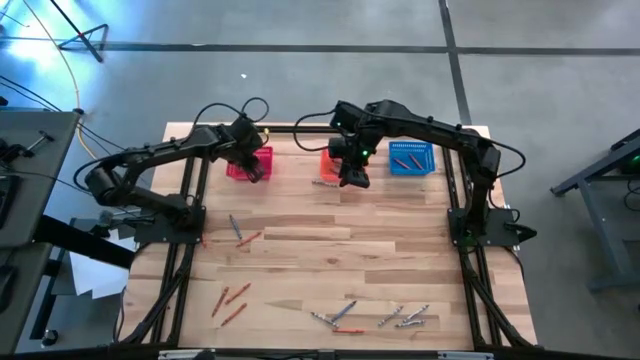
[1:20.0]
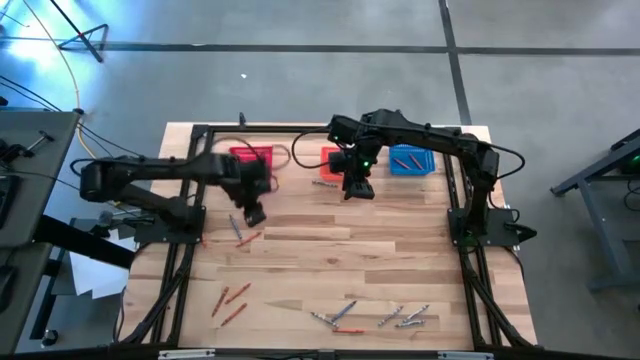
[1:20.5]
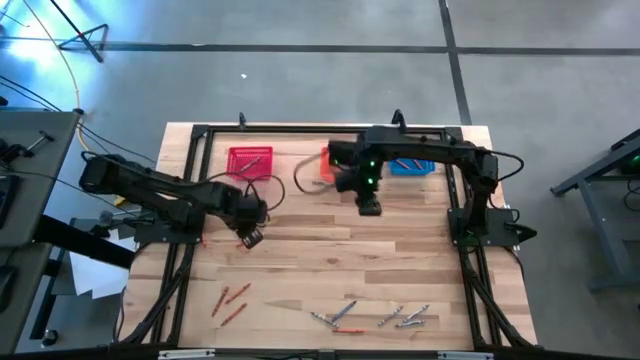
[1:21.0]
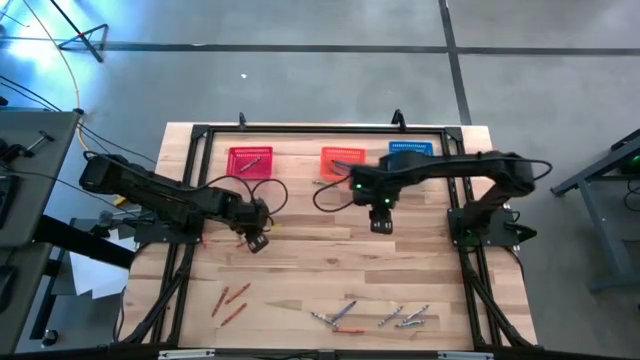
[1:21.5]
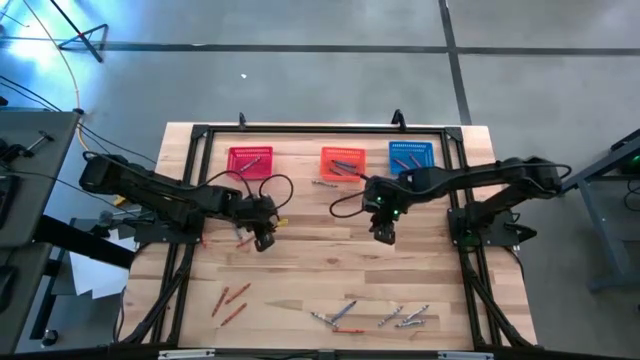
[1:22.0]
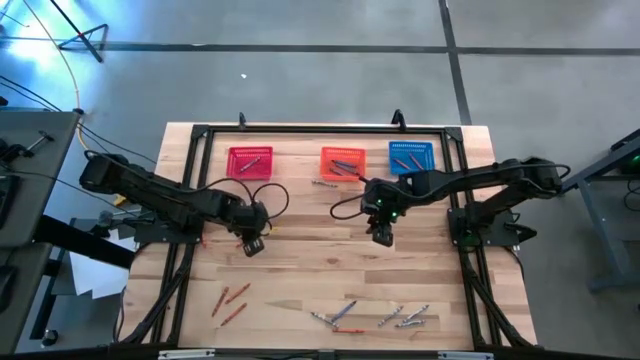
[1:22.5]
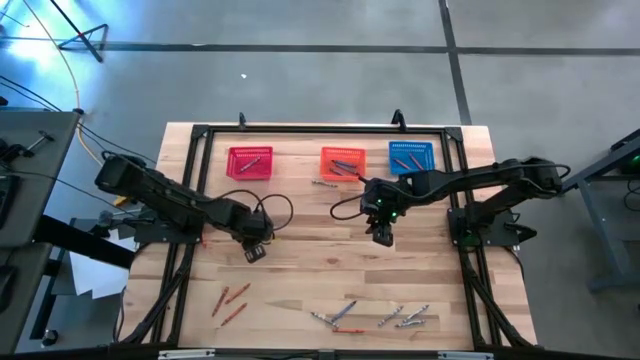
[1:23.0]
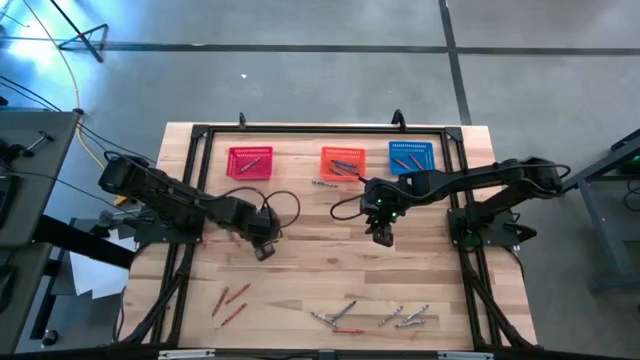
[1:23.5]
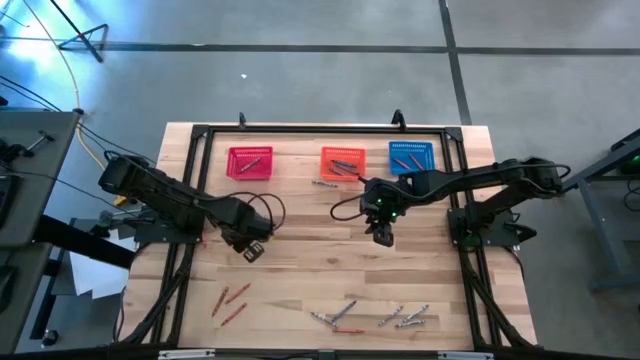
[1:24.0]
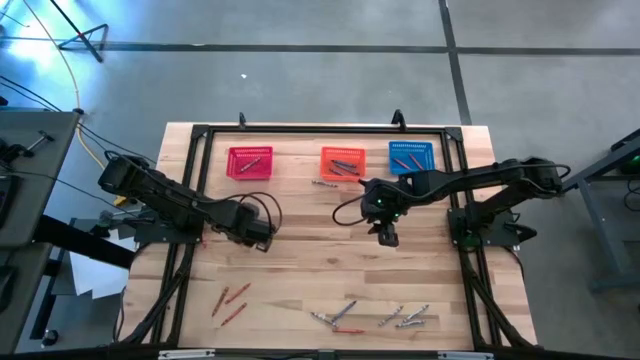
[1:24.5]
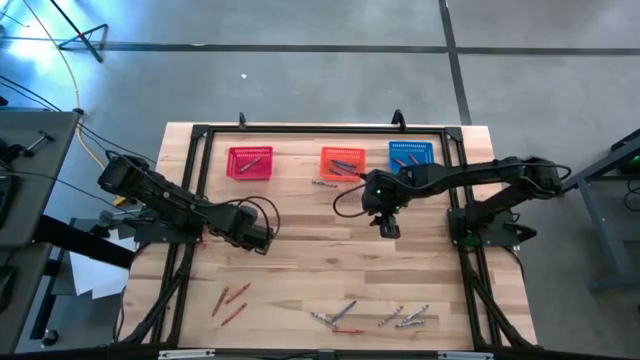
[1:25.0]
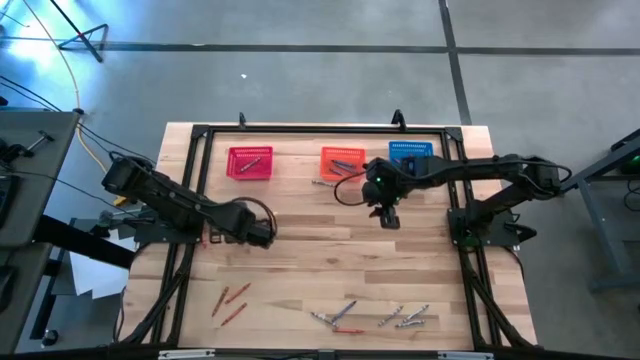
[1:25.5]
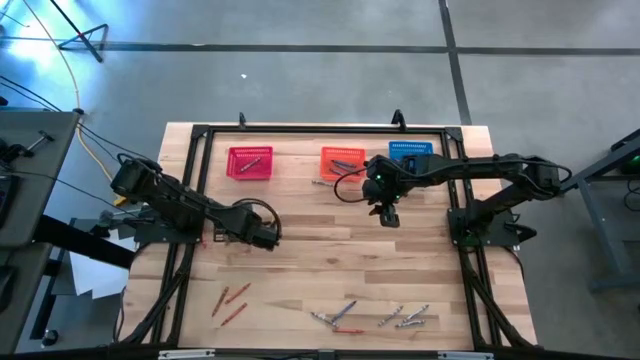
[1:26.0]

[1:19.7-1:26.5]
Task: Sort crayons
Put the orange crayon into the blue bin

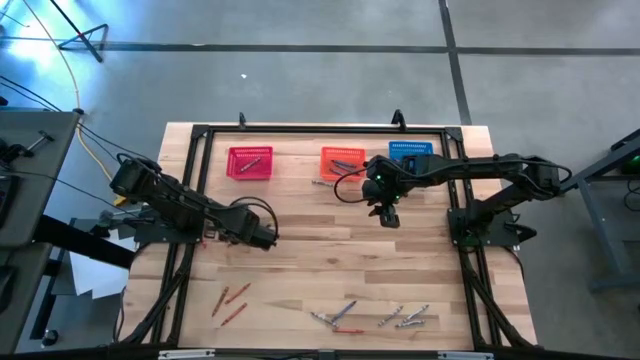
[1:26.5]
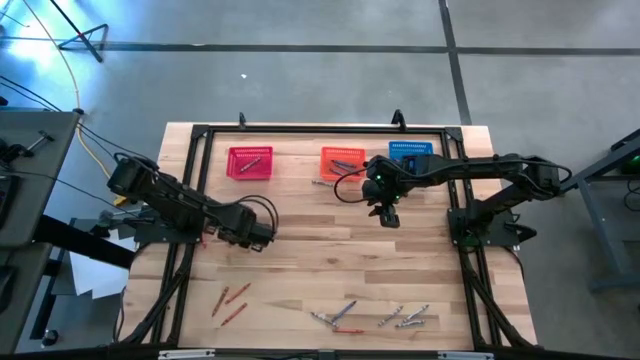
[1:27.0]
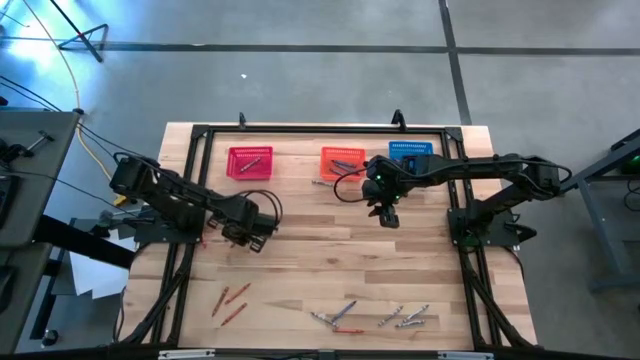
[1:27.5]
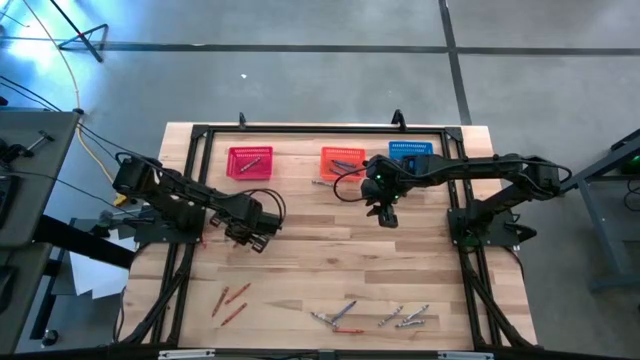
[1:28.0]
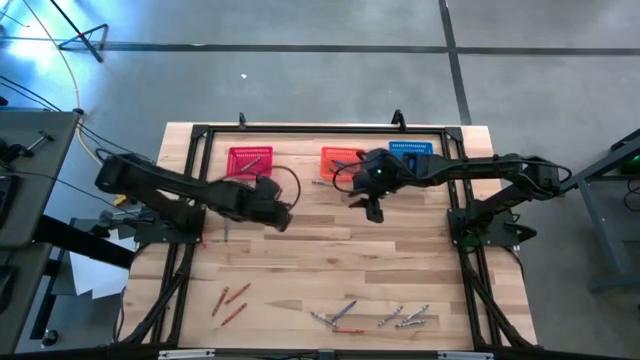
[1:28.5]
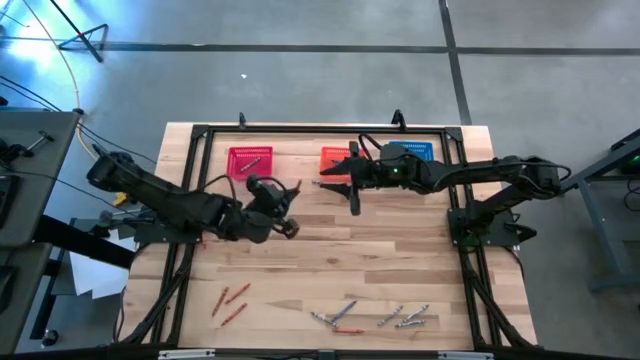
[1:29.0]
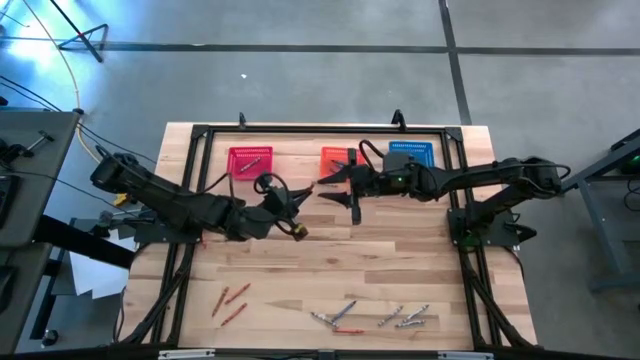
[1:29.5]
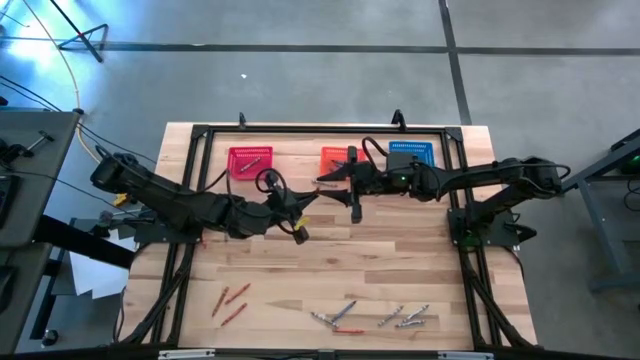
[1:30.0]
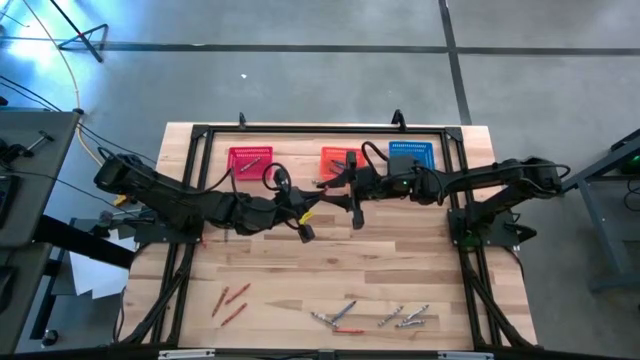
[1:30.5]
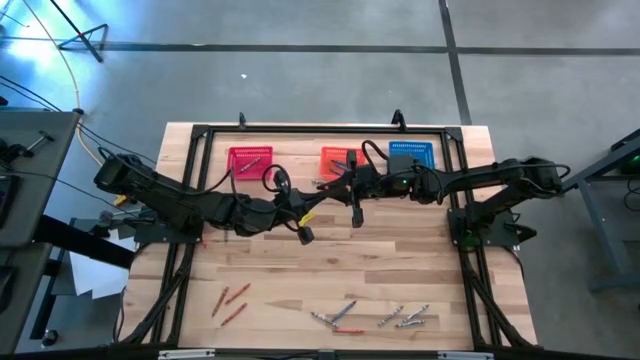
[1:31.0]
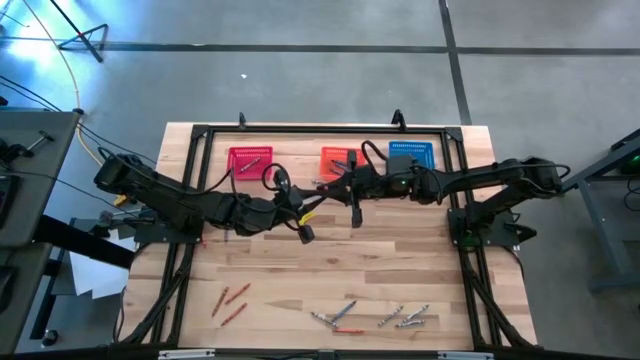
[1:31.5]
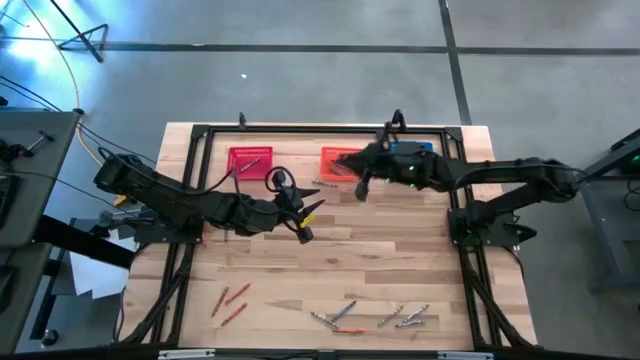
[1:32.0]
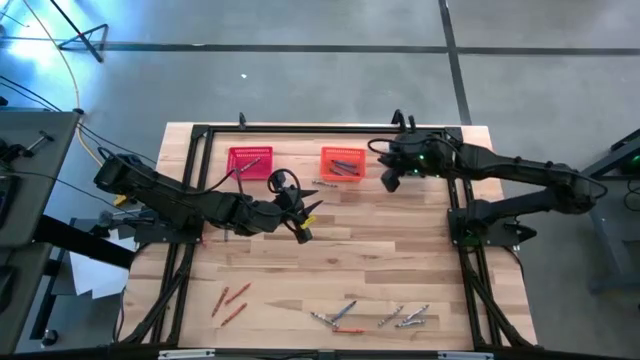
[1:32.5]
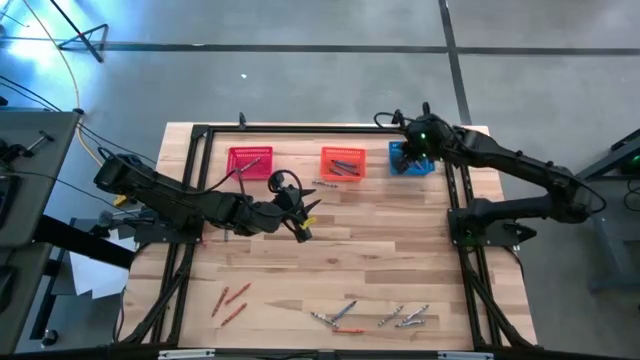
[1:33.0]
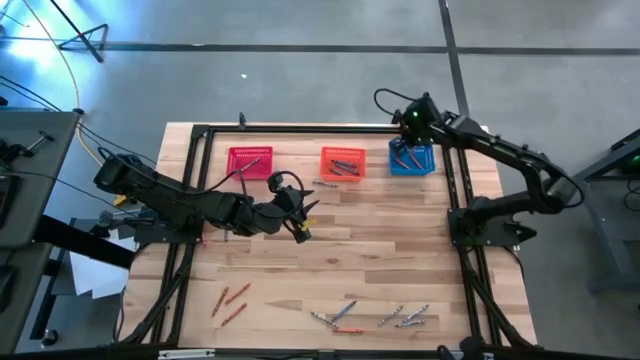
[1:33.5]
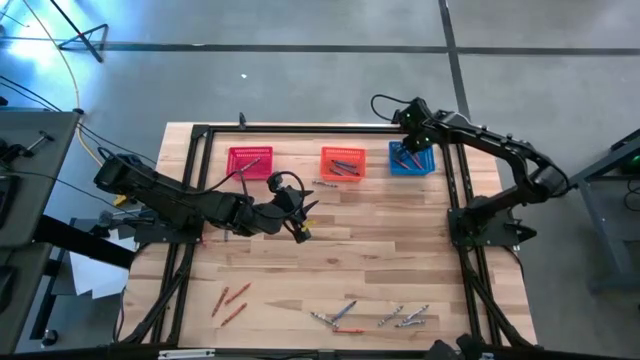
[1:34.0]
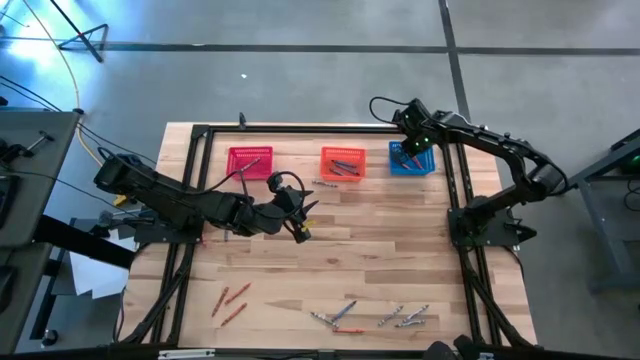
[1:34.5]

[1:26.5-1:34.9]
Put the orange crayon into the blue bin

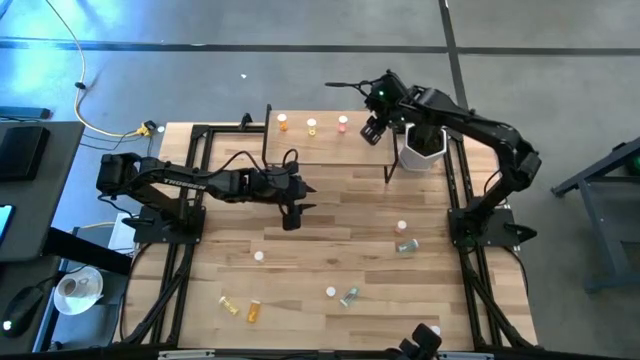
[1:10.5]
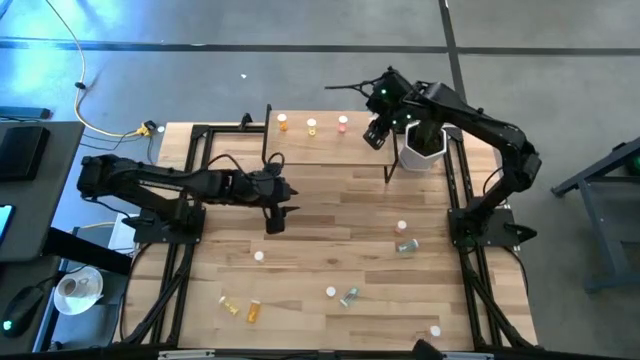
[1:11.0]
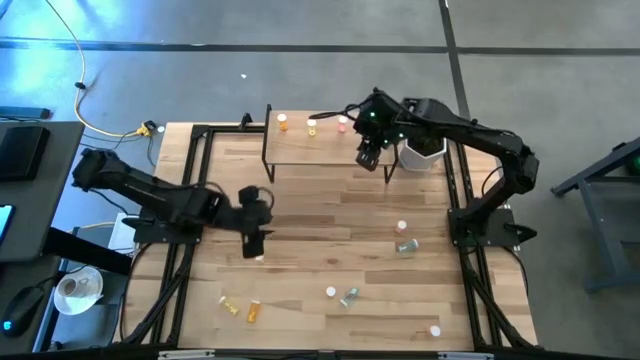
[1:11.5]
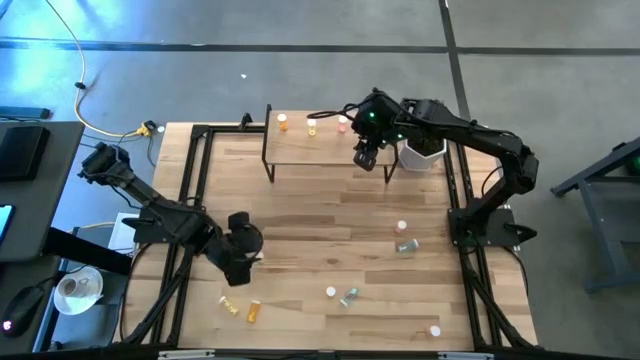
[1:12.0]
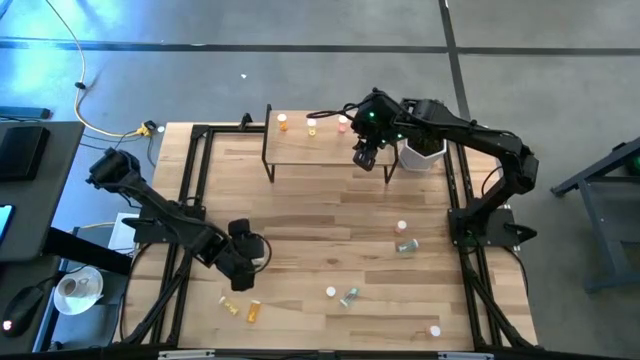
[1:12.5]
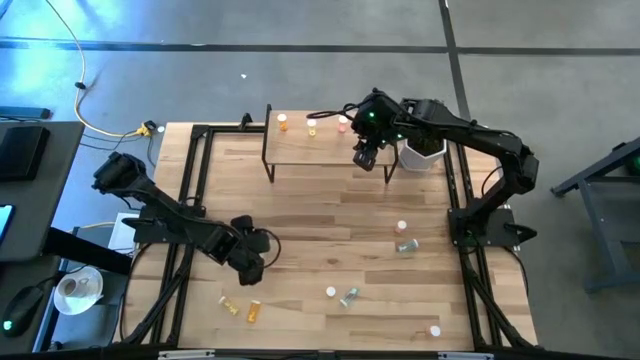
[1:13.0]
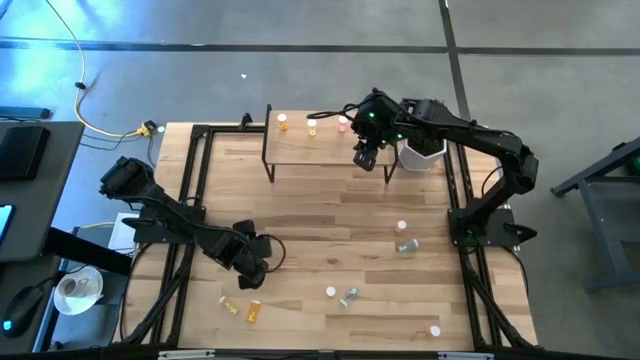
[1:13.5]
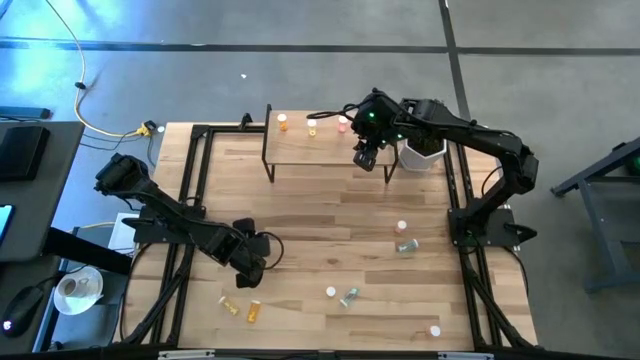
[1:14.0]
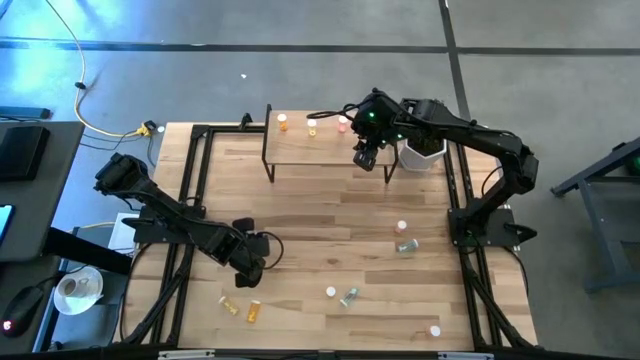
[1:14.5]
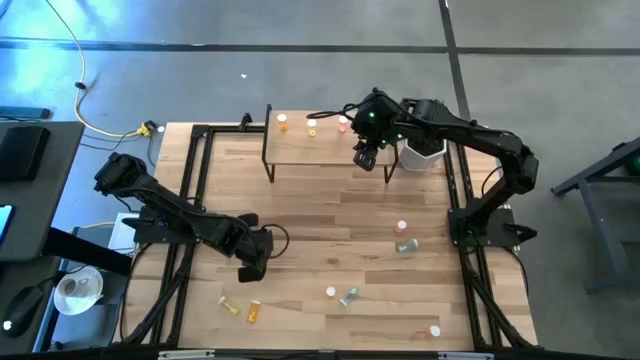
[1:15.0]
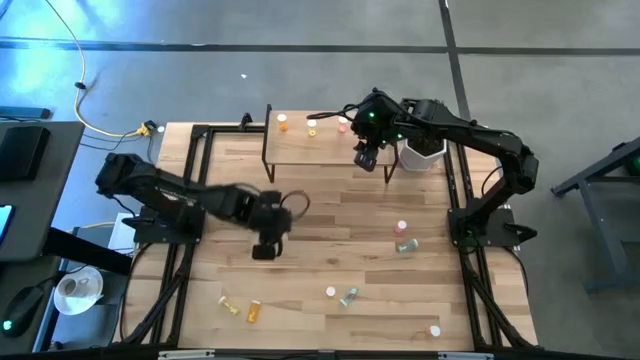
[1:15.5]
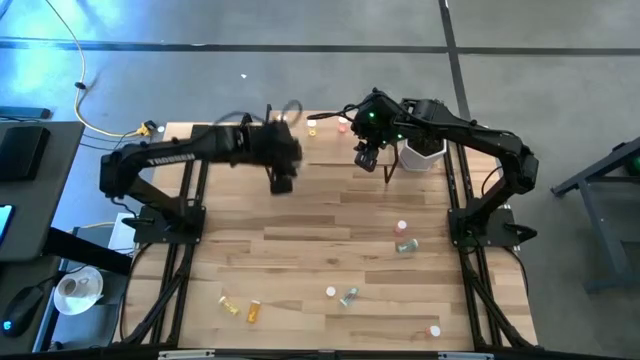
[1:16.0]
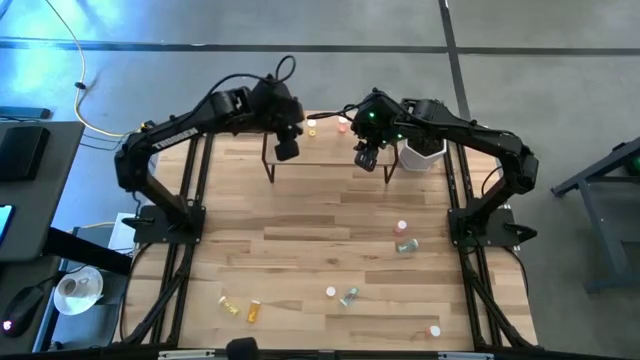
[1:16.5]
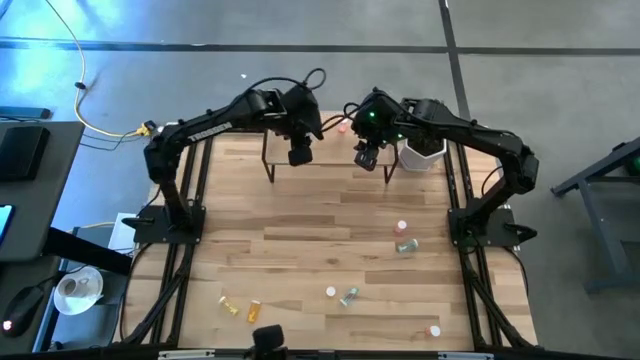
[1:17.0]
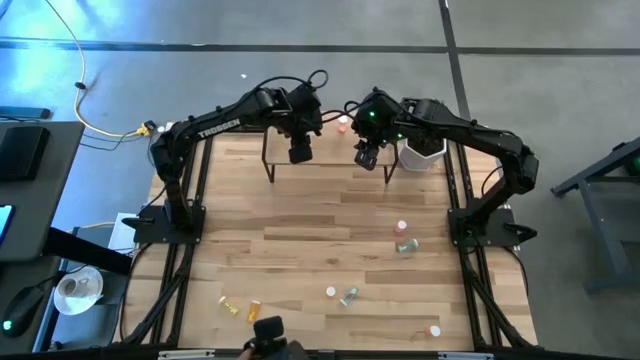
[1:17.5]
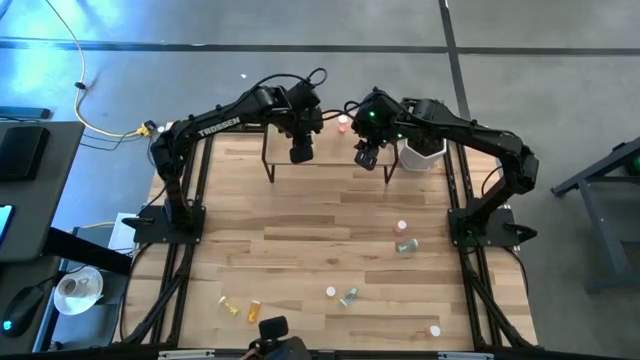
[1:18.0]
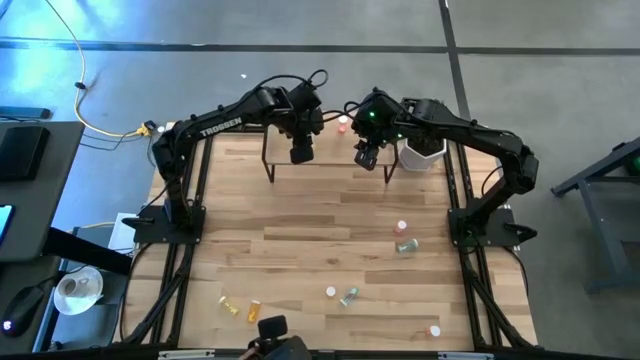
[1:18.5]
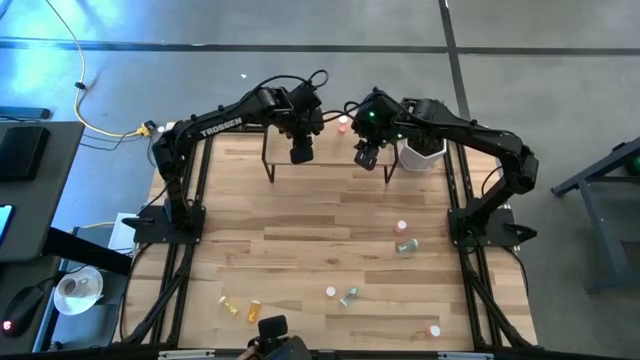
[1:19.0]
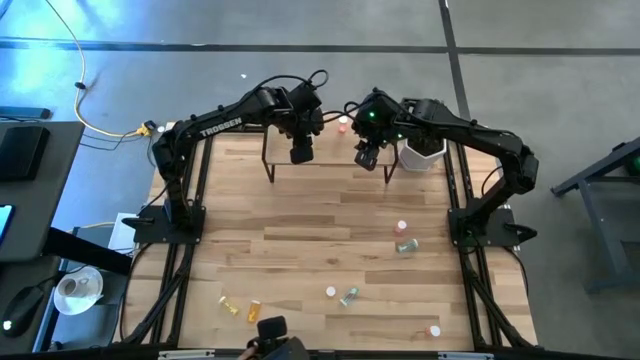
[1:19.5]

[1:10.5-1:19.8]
Task: Pick and place medicine bottles onto shelf by color
Put the top yellow pill bottle on the shelf aligned with the other yellow pill bottle
